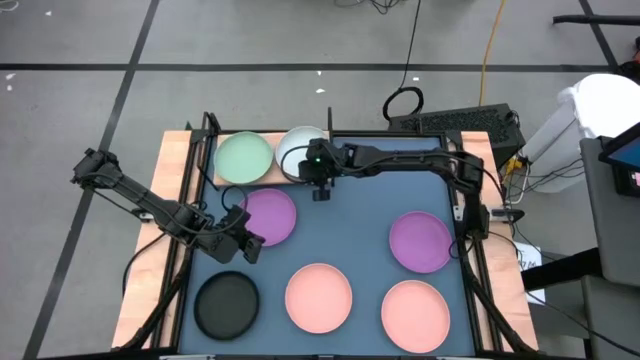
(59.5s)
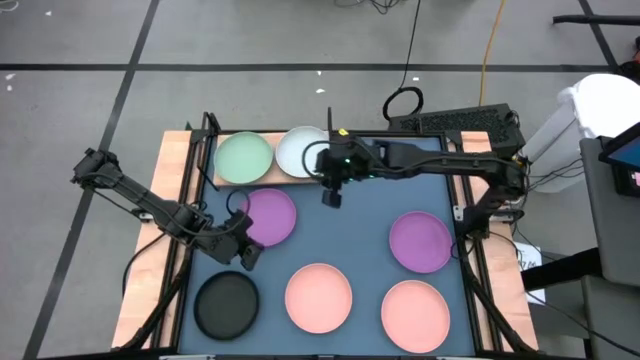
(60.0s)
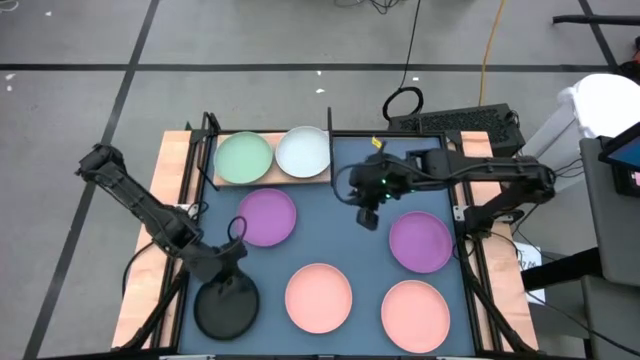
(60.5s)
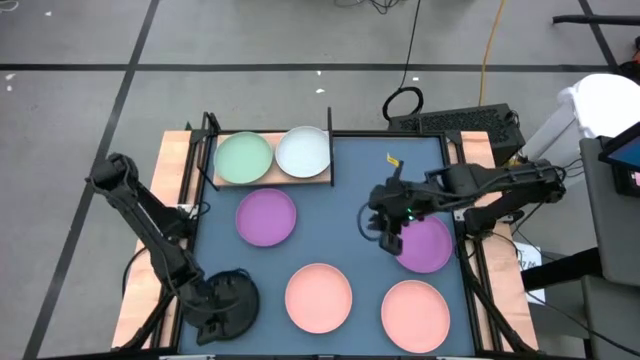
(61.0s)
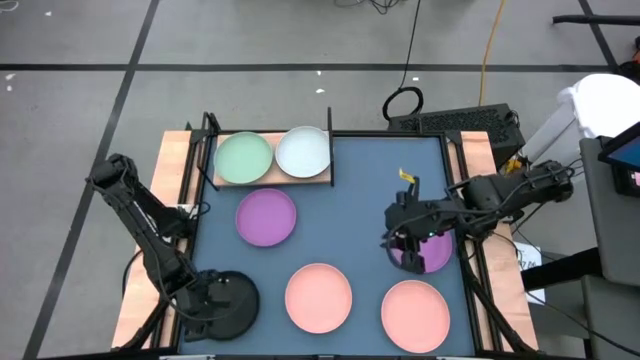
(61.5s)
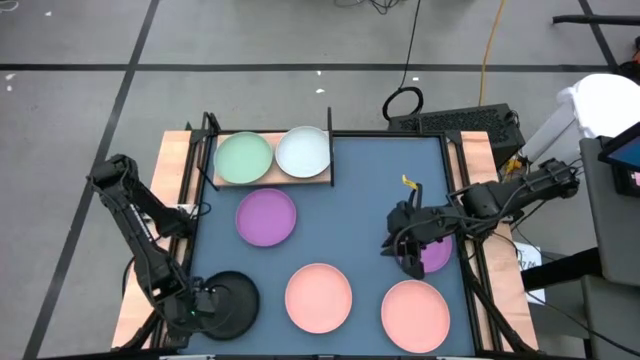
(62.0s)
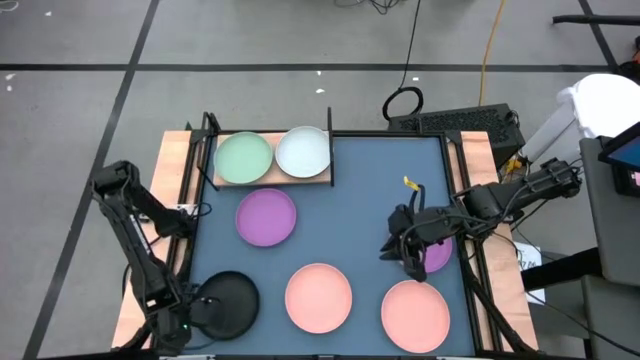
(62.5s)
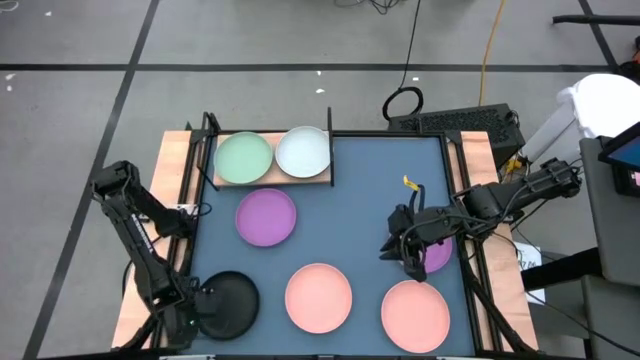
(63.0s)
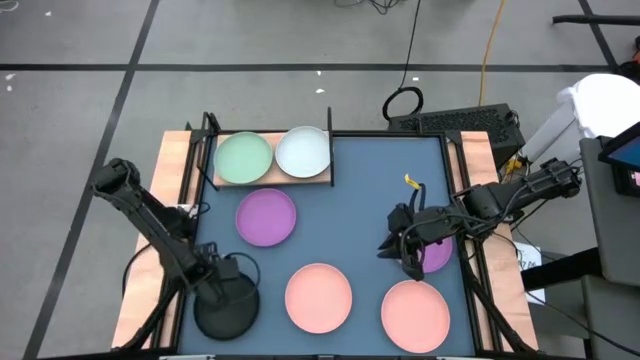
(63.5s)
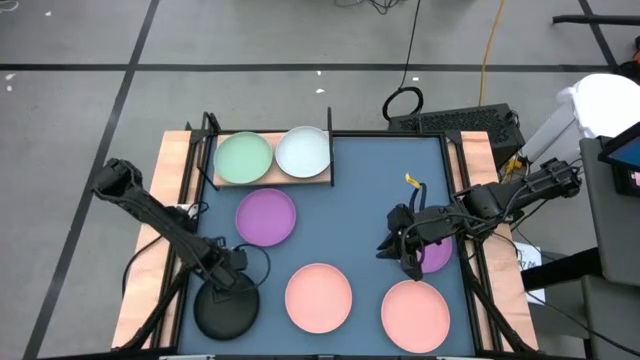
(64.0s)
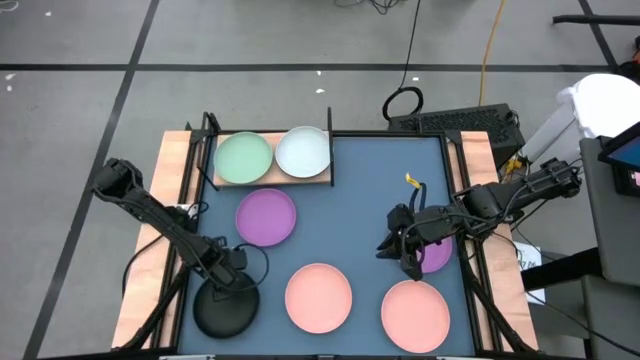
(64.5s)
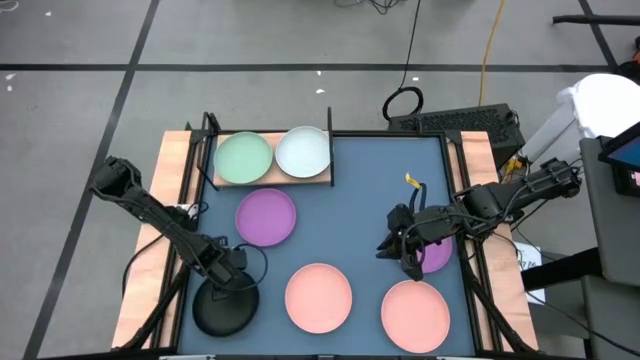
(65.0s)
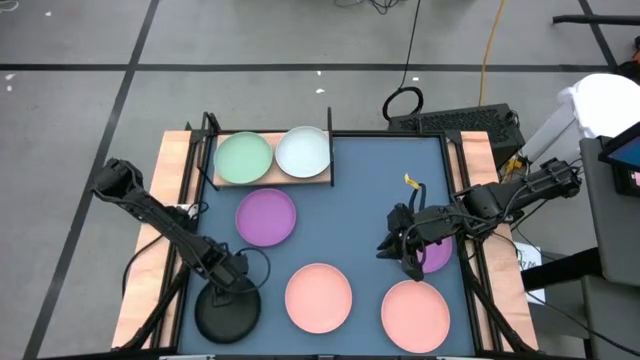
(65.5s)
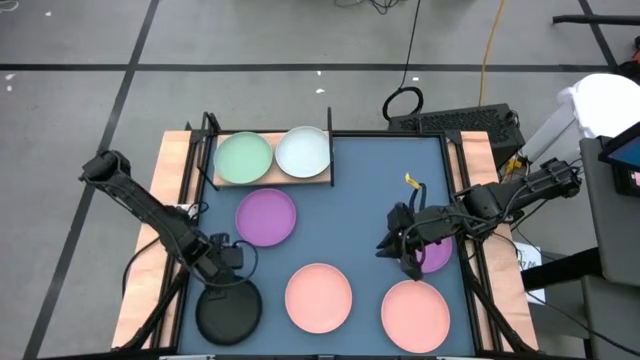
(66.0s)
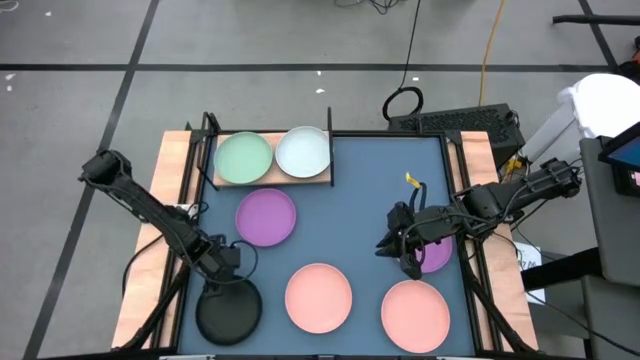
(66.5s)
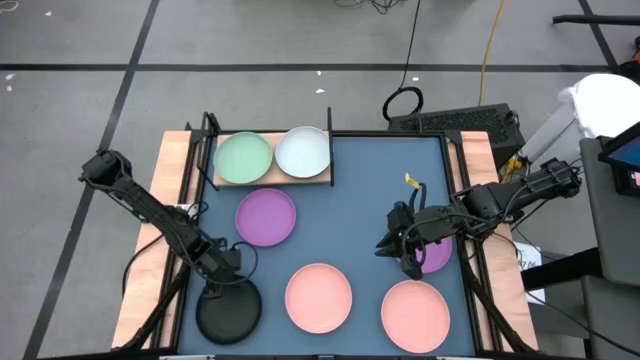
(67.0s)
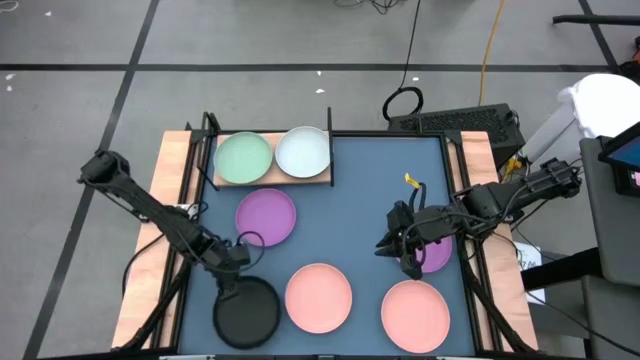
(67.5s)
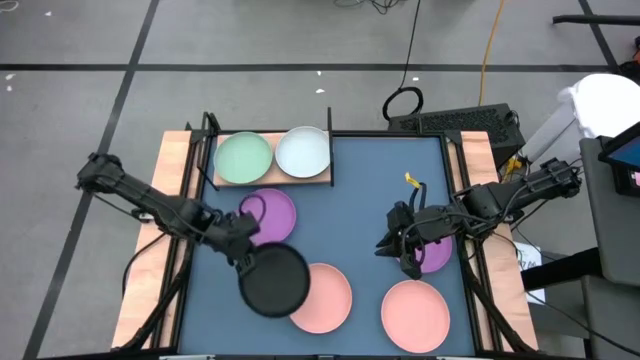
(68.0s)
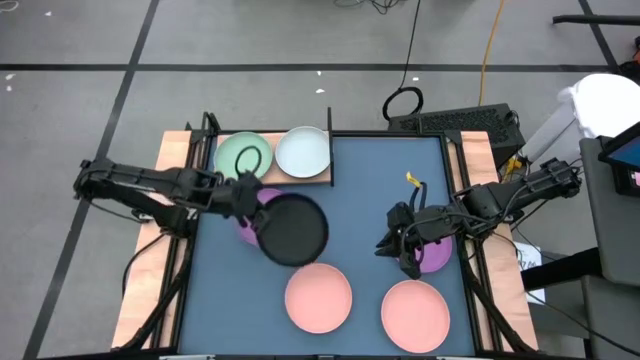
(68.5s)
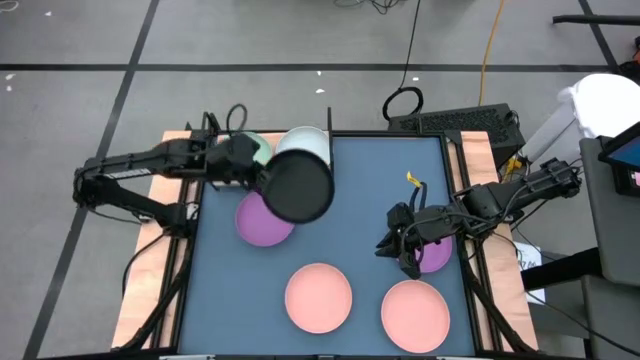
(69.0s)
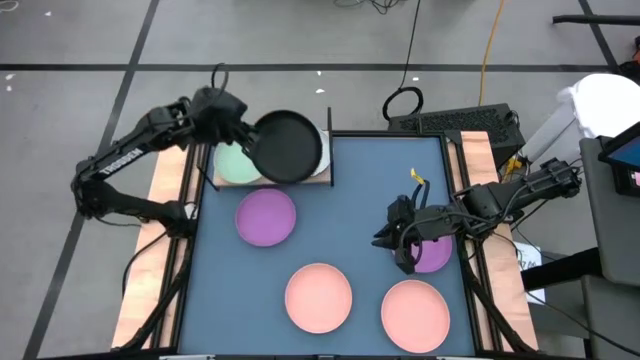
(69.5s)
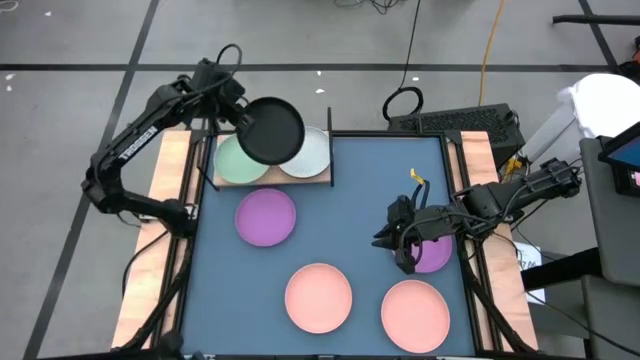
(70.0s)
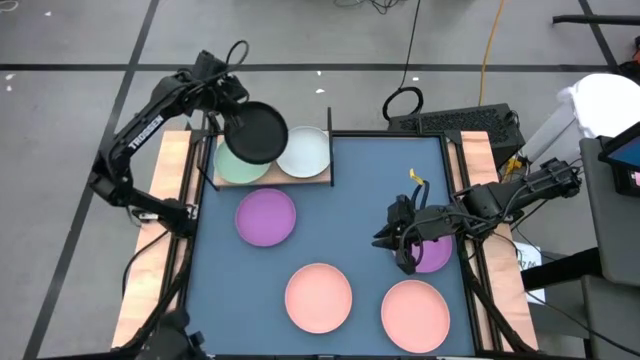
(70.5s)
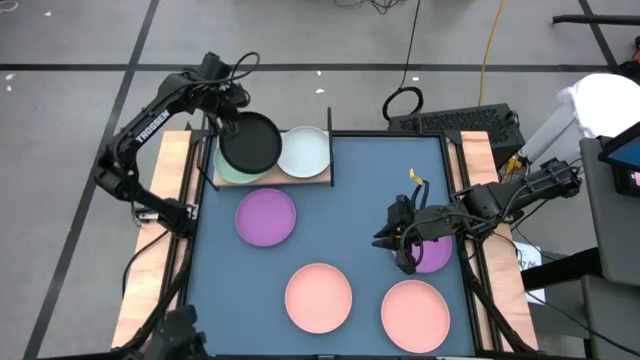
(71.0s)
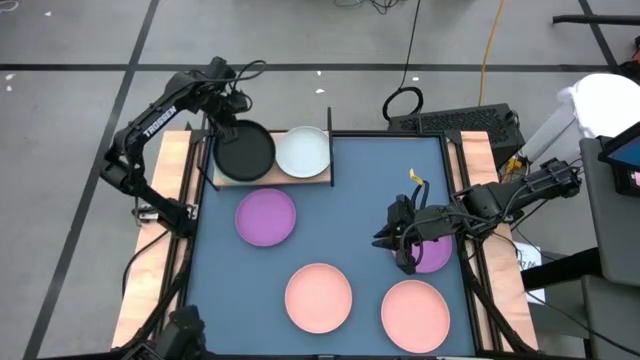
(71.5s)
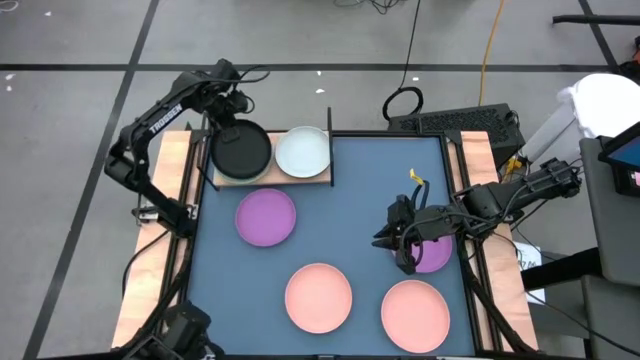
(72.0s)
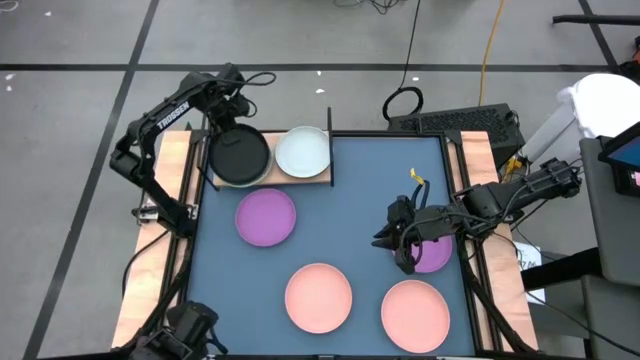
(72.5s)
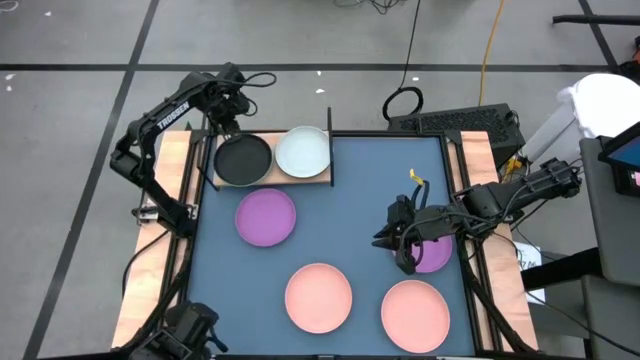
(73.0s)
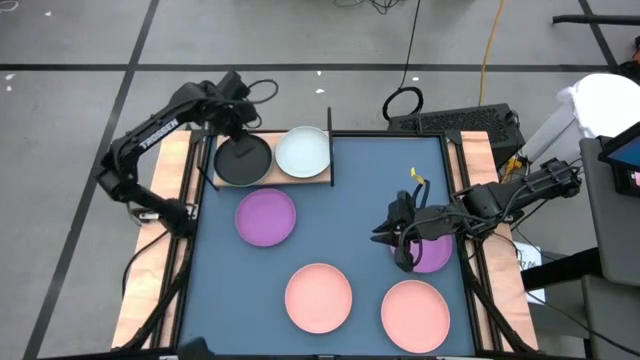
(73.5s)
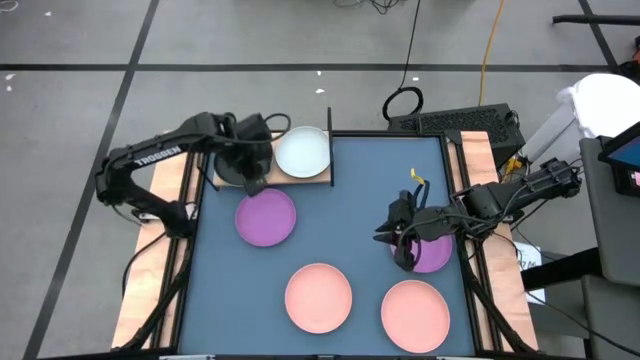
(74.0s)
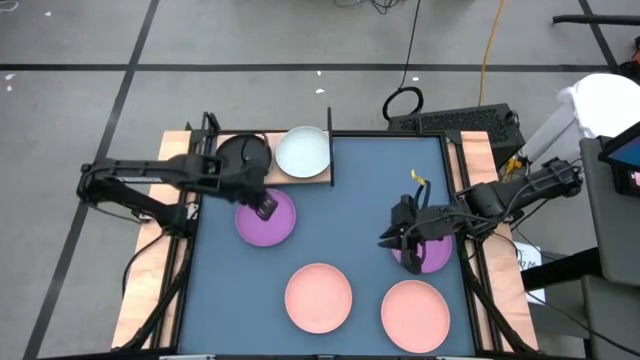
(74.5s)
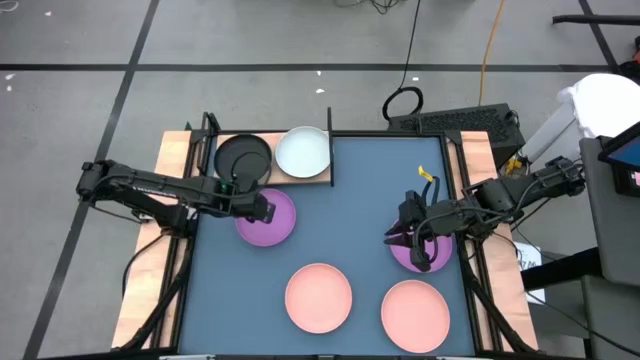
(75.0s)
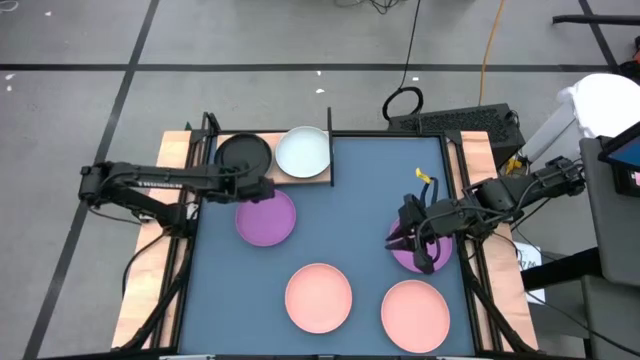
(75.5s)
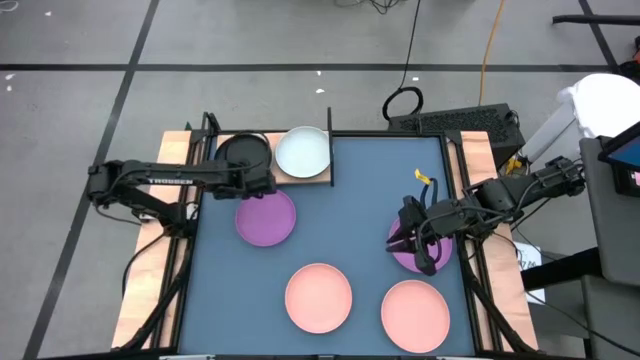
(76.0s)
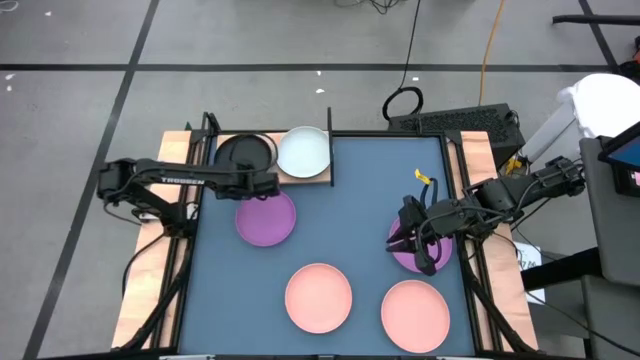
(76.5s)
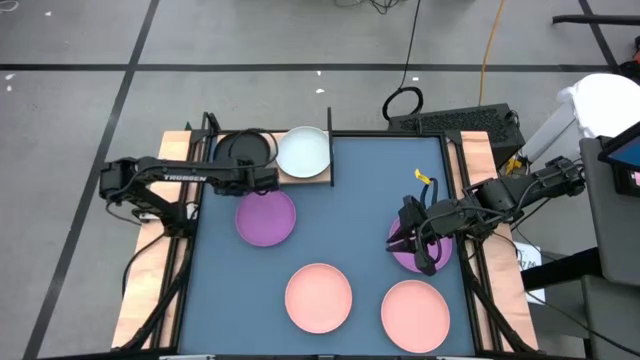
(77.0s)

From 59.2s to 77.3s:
Task: Place and stack plates onto a shelf
Stack the black plate on top of the light green plate on the shelf
